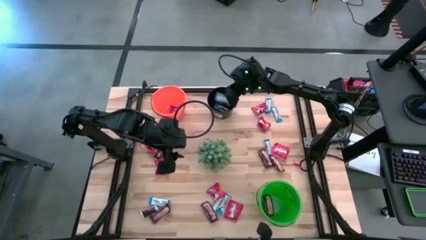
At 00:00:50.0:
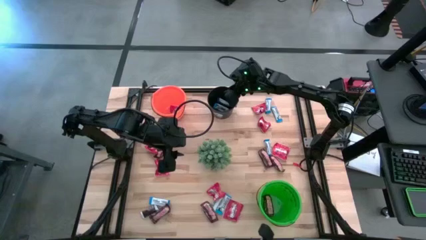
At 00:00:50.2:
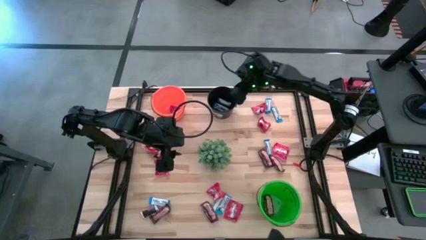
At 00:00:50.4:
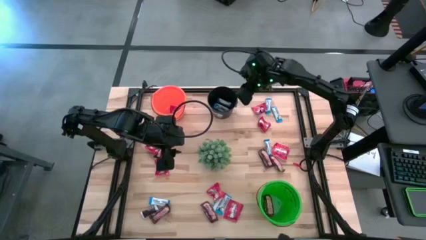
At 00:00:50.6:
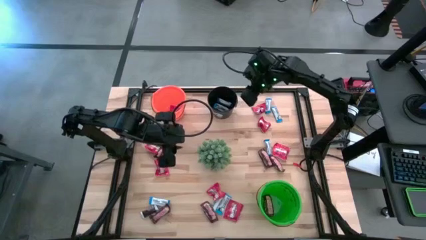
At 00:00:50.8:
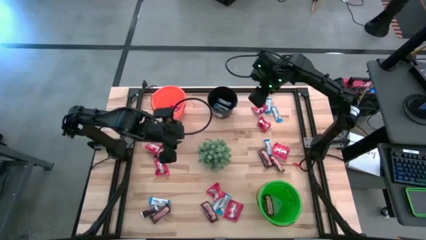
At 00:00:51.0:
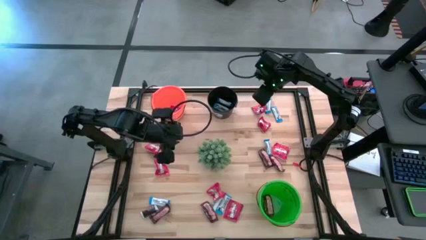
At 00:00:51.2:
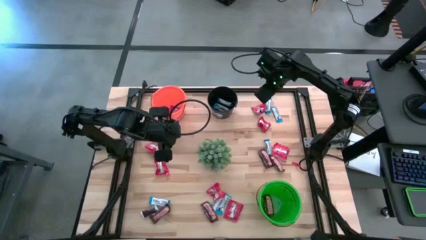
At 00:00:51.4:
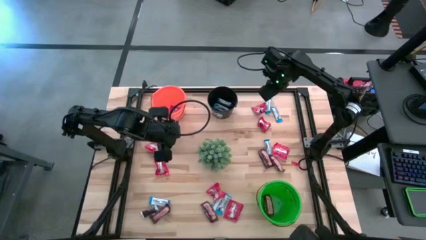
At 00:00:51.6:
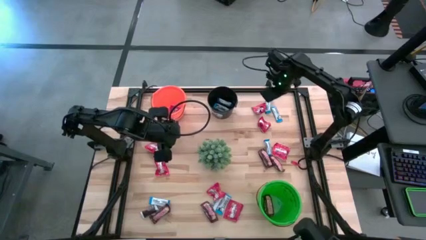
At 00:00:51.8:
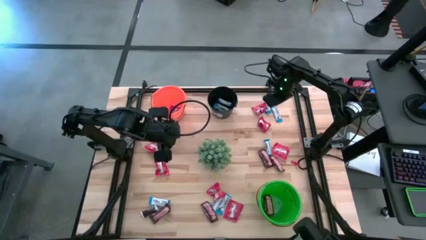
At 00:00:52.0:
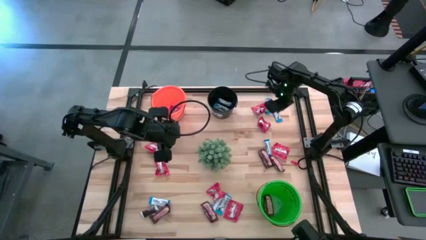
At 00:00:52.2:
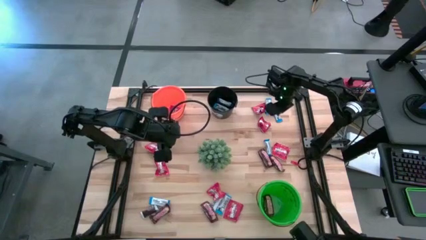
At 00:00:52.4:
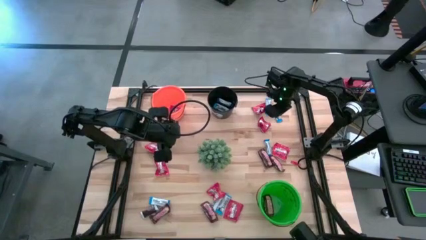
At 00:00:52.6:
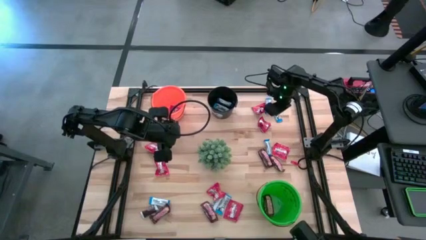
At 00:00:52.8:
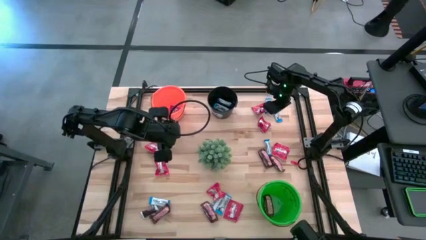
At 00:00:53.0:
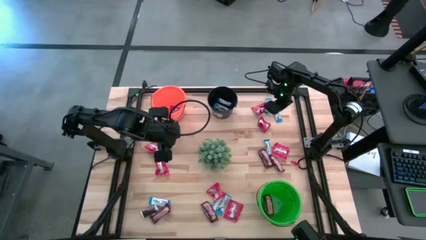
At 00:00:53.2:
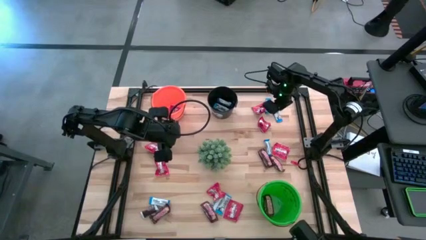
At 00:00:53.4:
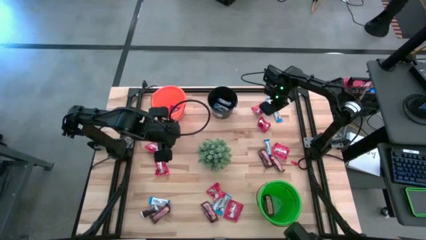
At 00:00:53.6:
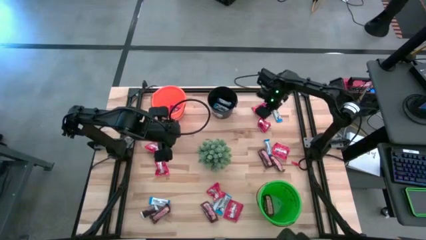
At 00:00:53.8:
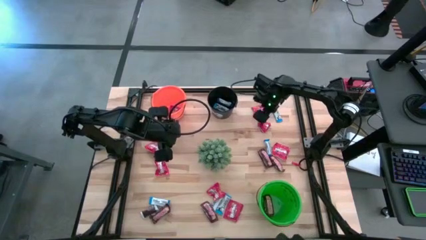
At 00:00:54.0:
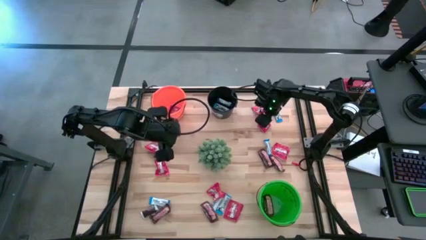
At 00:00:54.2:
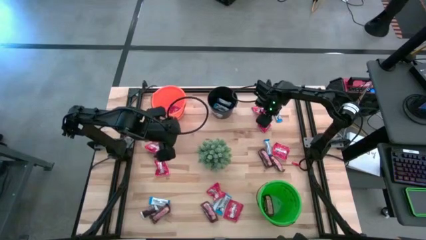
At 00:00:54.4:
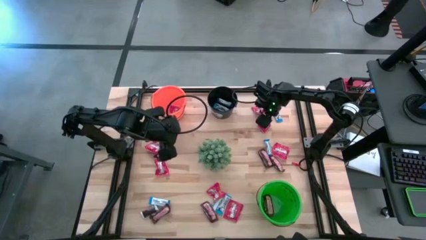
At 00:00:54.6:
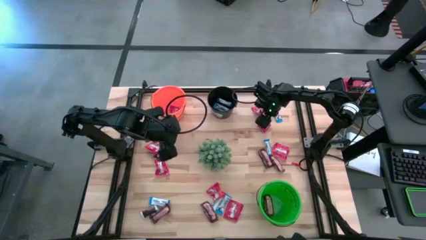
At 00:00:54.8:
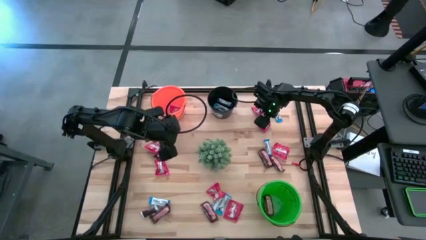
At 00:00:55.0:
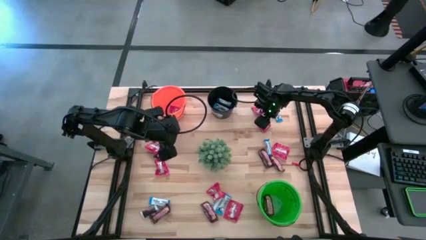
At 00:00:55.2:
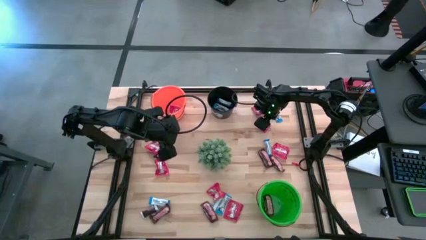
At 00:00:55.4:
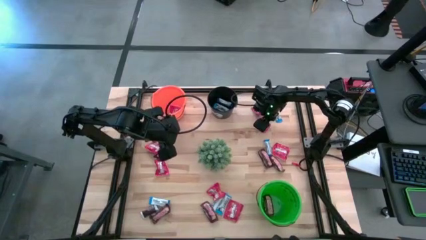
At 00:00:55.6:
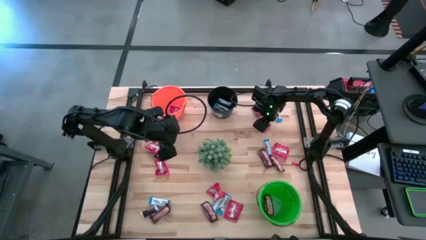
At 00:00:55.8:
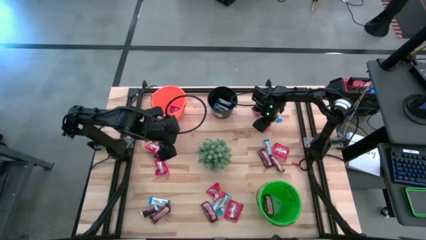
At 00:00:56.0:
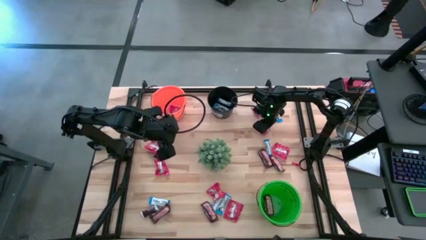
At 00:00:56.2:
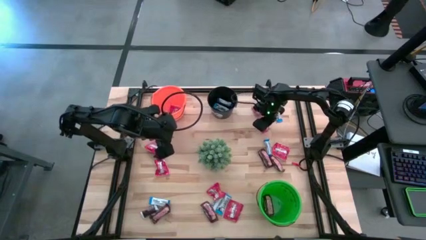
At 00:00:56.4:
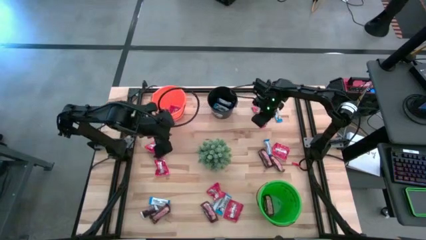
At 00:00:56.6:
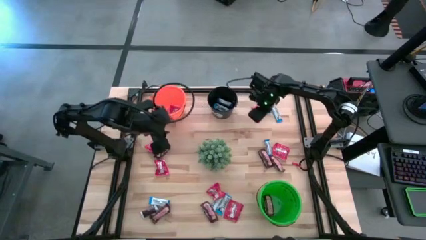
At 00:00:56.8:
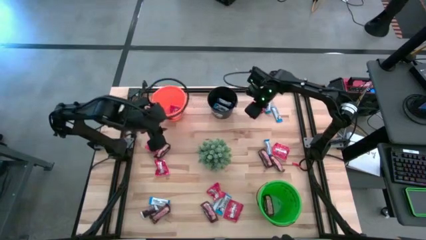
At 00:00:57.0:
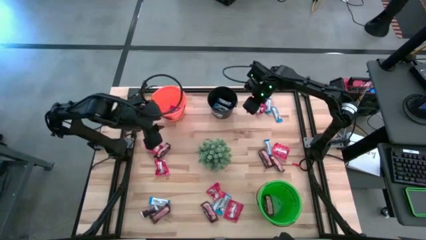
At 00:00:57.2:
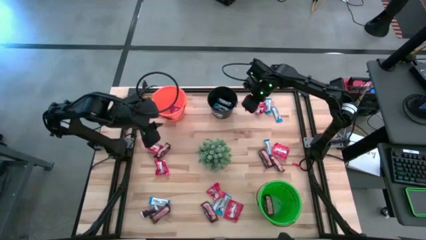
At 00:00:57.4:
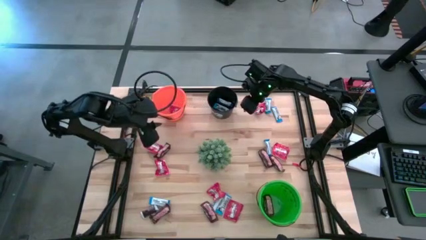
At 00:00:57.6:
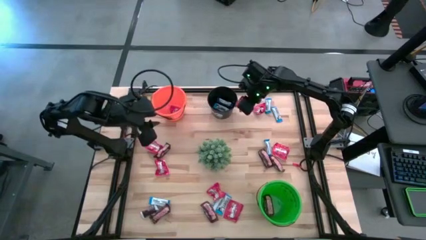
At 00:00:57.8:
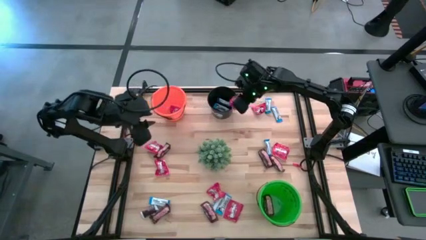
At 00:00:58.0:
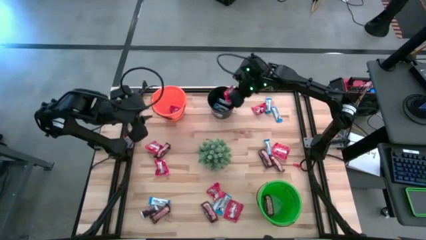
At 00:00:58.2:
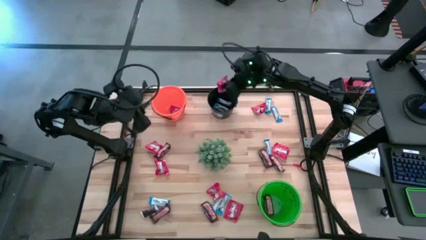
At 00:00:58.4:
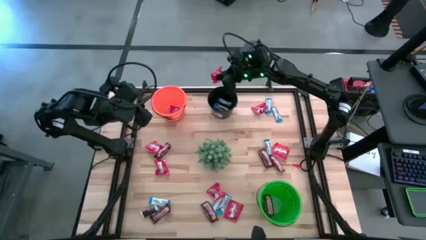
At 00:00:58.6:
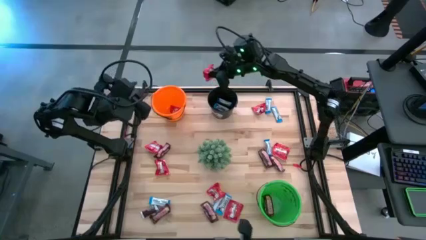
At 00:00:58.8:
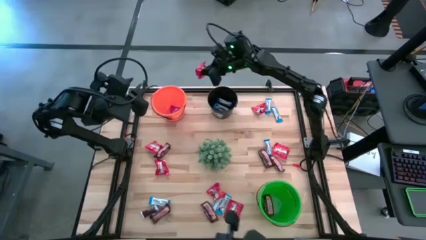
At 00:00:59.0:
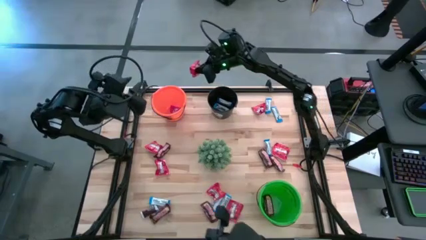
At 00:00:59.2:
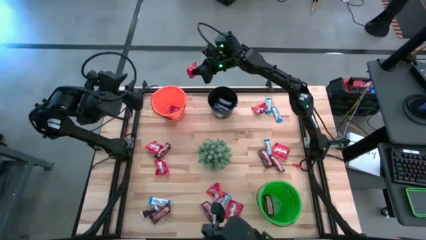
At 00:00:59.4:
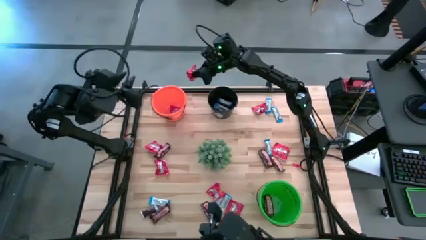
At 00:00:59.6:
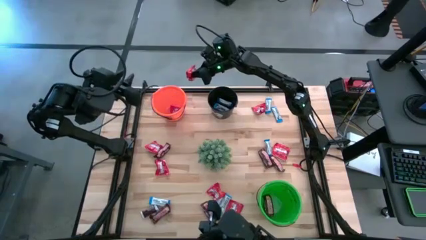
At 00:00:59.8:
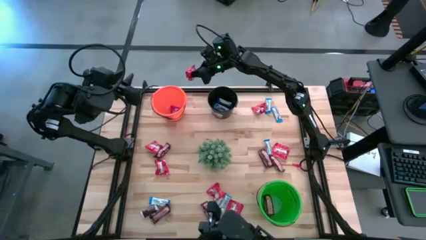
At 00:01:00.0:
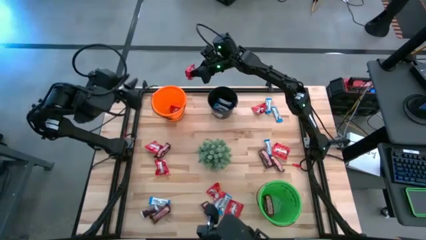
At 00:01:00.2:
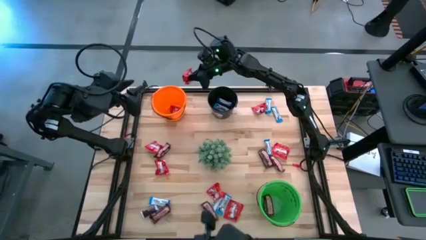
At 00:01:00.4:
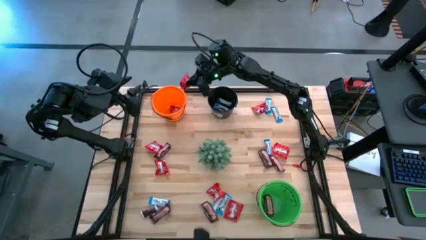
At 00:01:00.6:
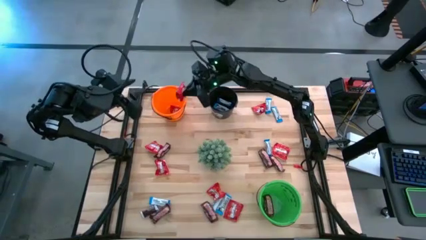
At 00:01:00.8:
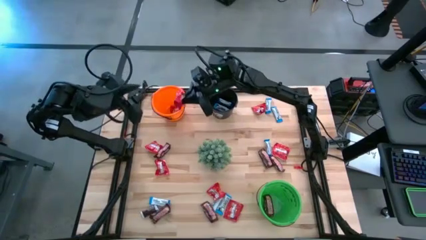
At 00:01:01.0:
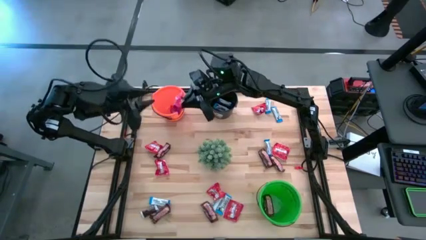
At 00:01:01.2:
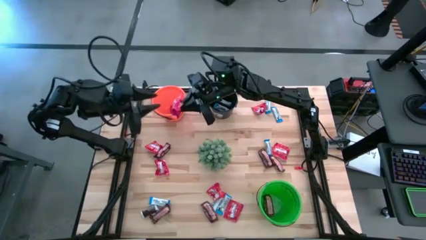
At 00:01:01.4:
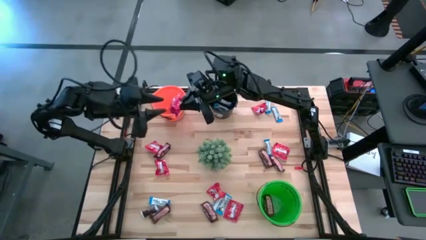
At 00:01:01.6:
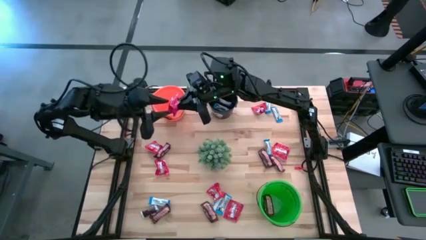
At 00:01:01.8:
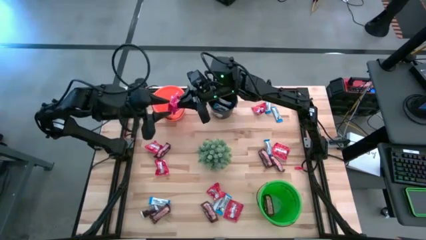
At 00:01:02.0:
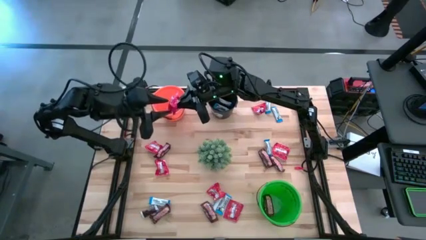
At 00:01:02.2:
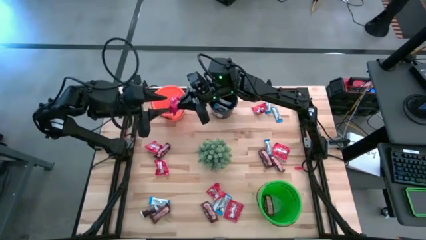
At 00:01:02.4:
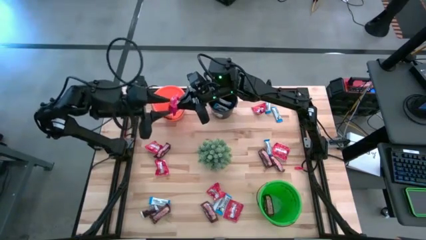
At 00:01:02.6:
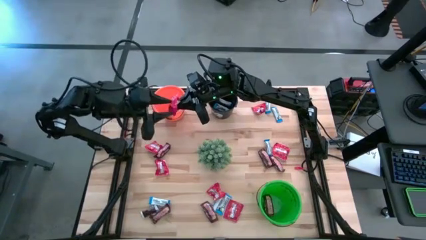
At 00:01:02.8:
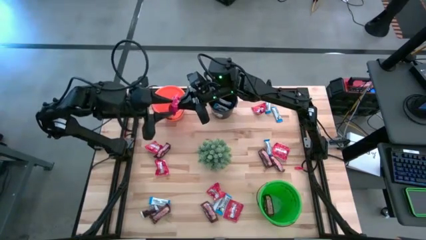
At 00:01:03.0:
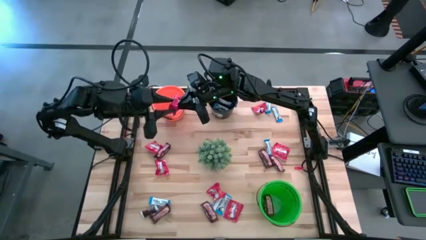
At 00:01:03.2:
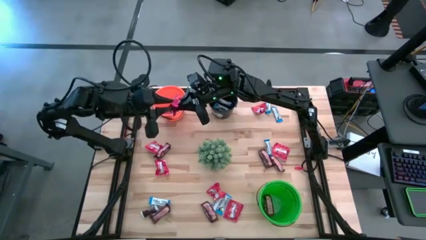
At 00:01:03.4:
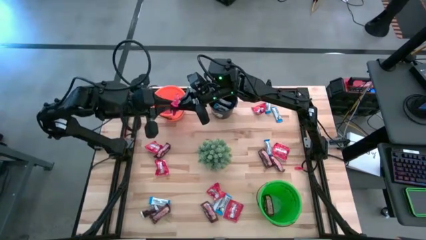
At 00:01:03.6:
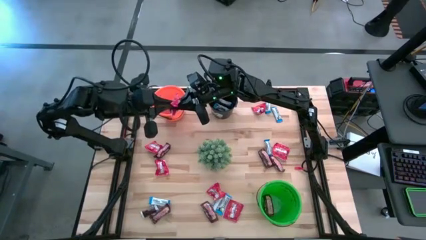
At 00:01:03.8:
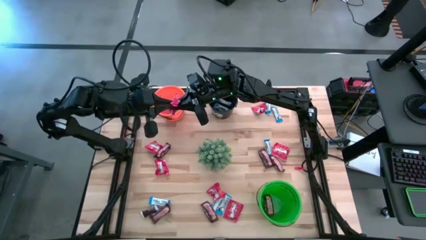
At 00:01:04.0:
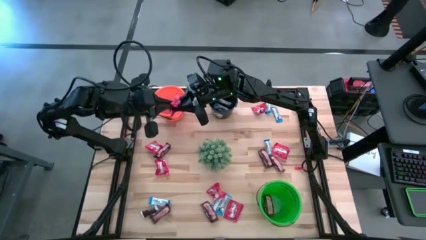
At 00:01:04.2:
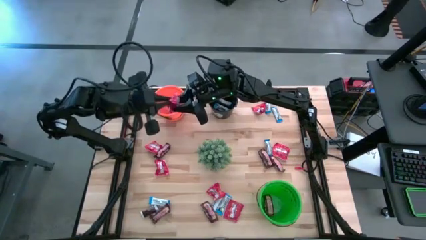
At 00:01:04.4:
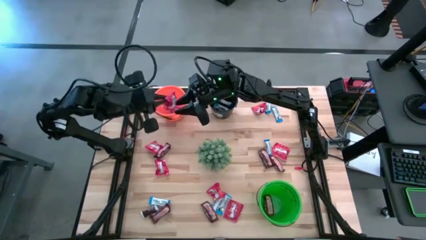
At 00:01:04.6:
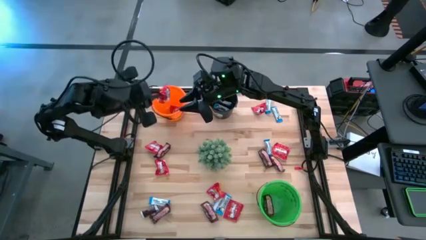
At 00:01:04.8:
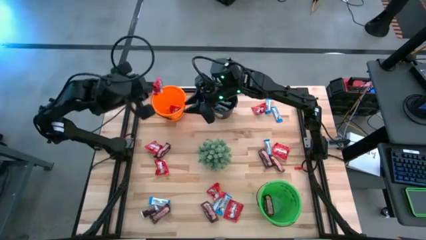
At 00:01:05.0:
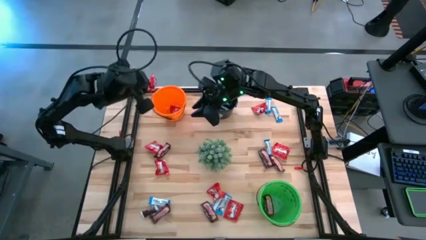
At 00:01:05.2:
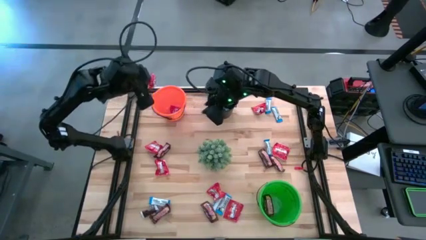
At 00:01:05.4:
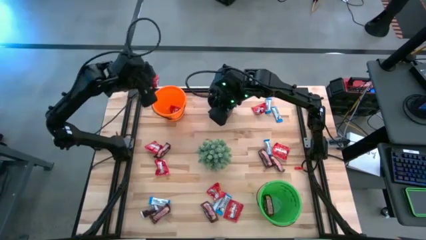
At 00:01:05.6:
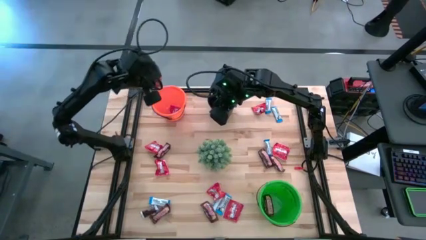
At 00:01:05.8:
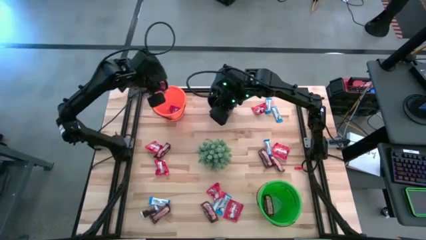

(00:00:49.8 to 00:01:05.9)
Task: Organize candy in baskets
Put the red candy into the orange bucket
